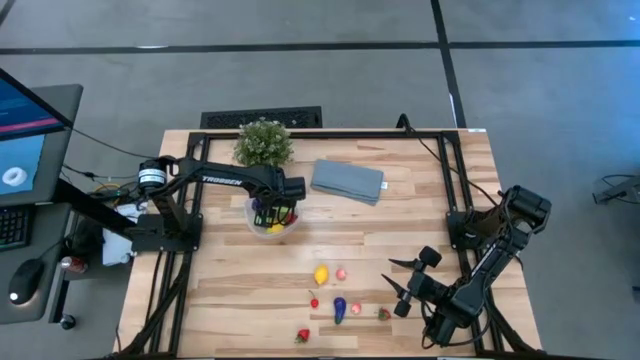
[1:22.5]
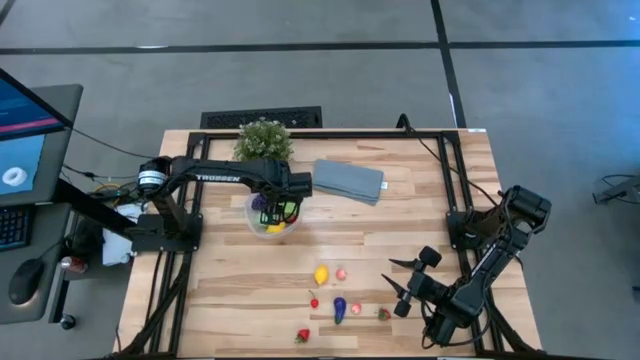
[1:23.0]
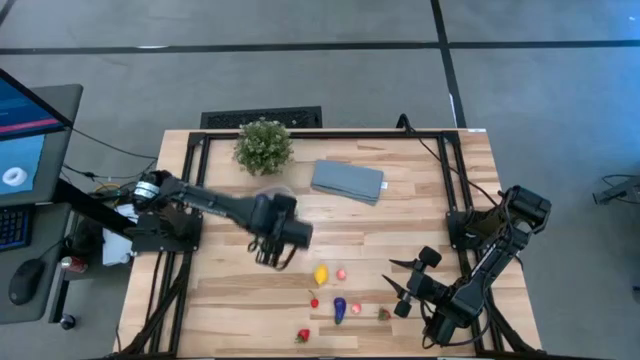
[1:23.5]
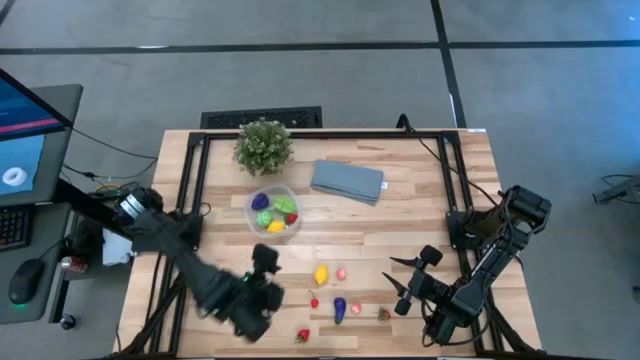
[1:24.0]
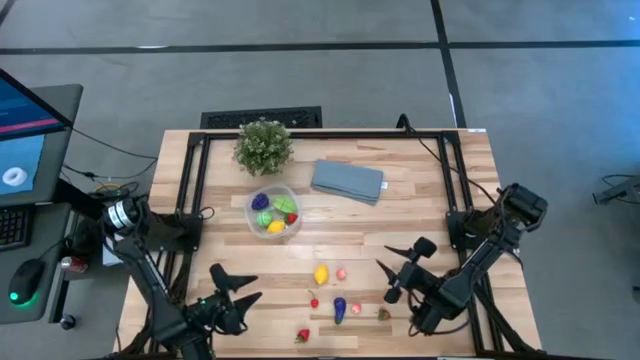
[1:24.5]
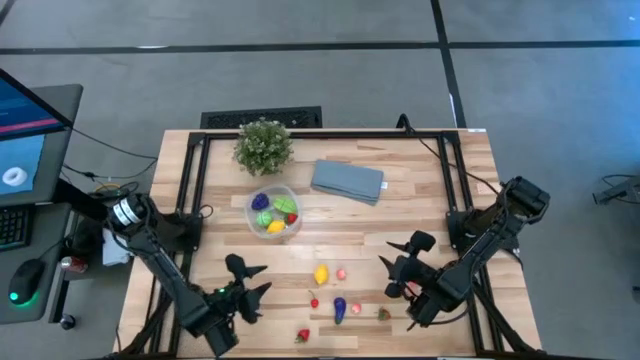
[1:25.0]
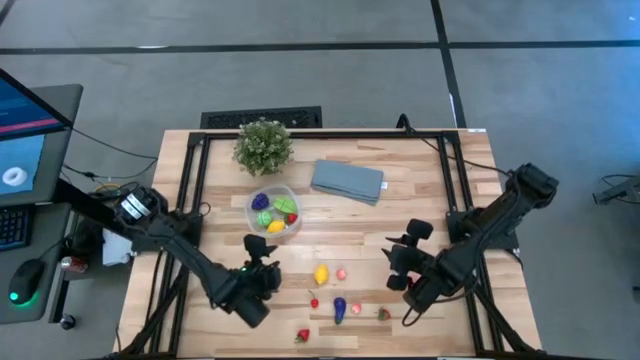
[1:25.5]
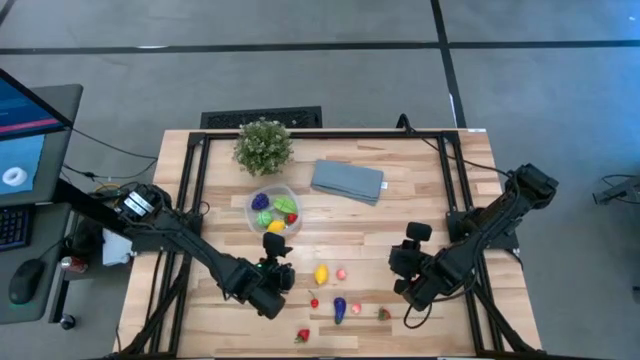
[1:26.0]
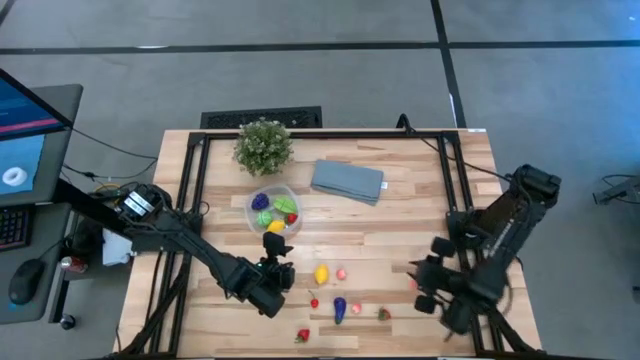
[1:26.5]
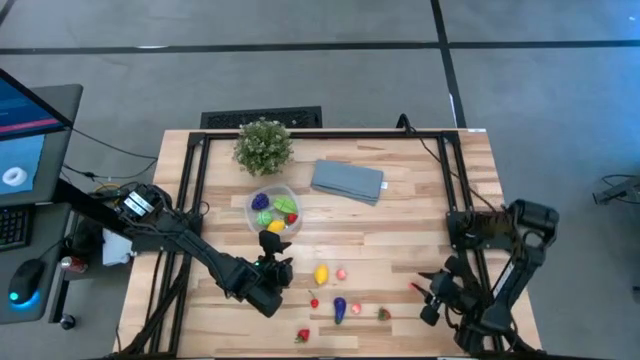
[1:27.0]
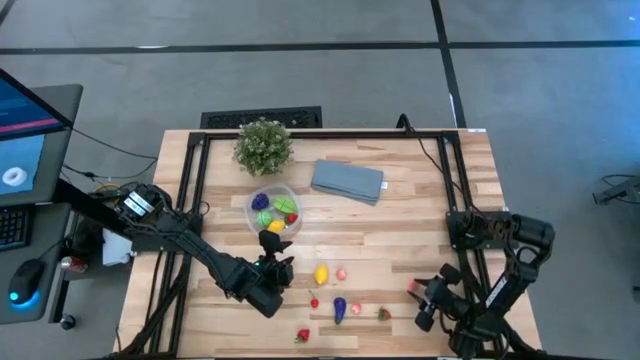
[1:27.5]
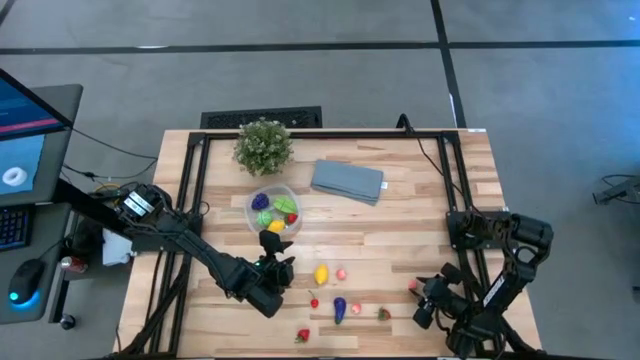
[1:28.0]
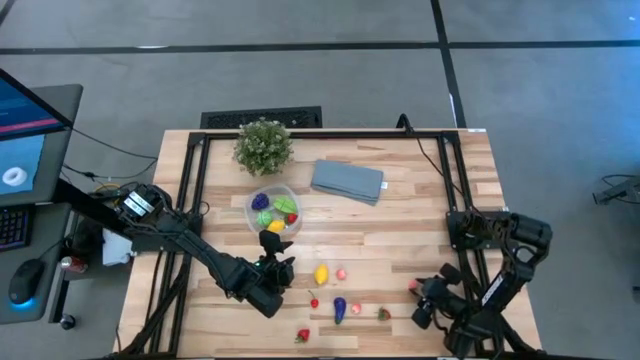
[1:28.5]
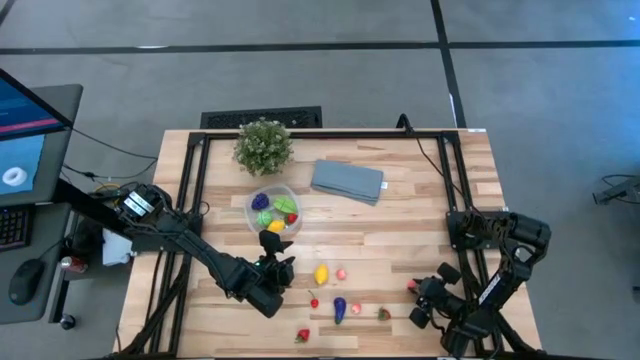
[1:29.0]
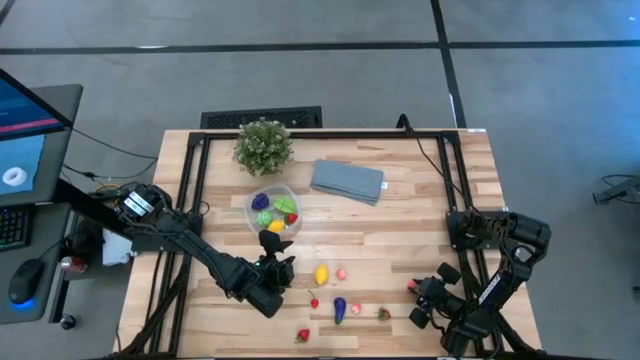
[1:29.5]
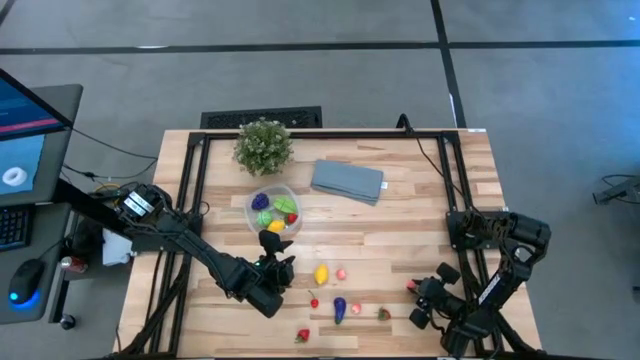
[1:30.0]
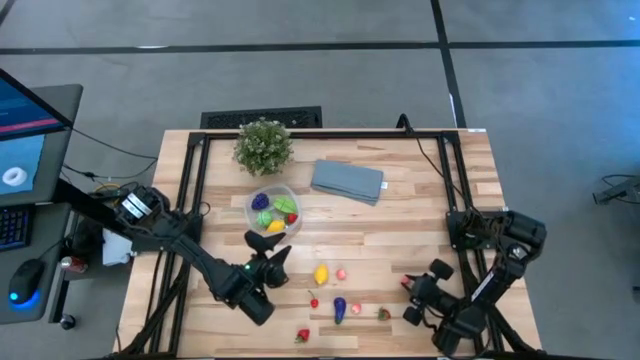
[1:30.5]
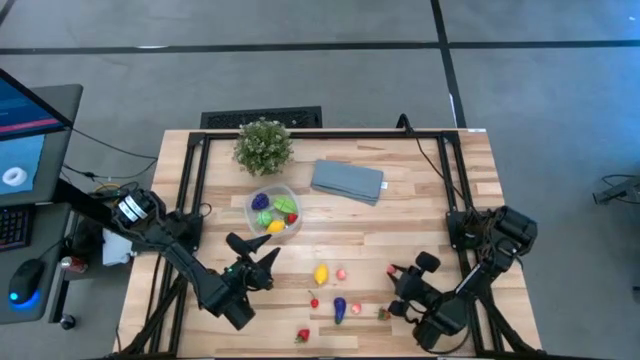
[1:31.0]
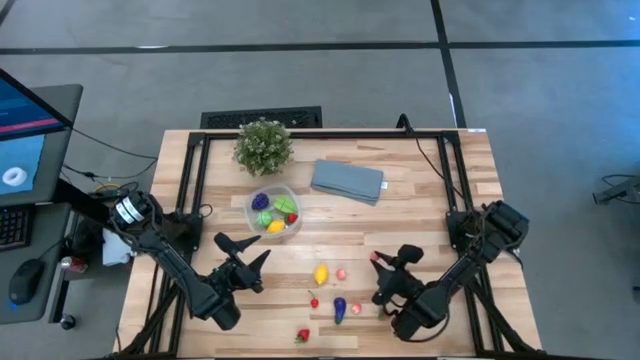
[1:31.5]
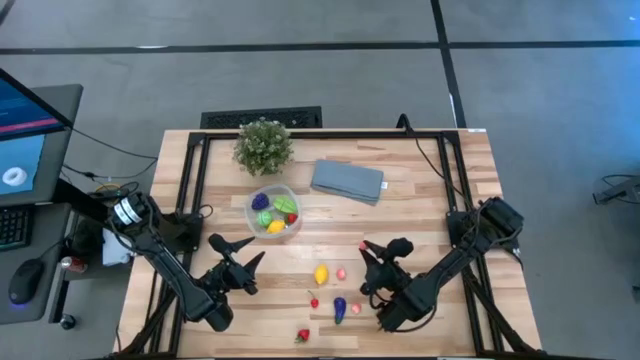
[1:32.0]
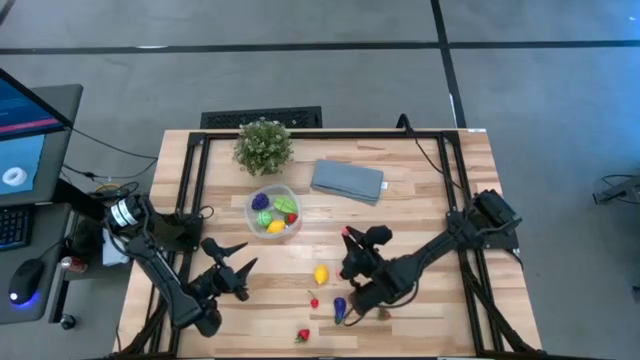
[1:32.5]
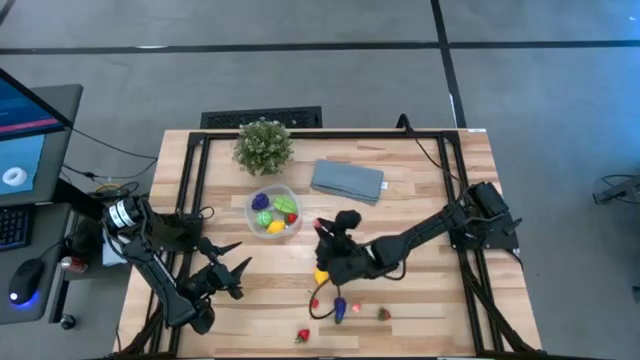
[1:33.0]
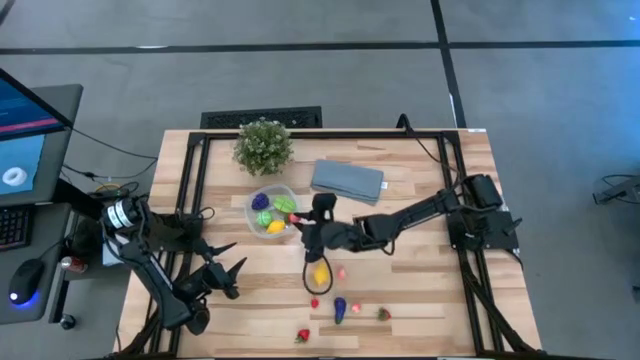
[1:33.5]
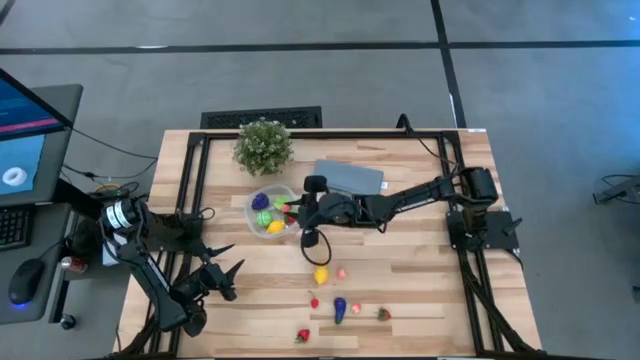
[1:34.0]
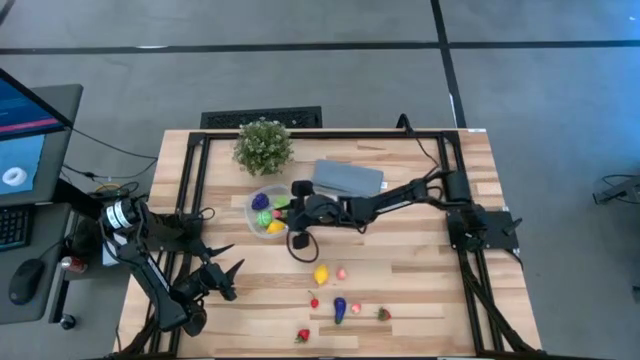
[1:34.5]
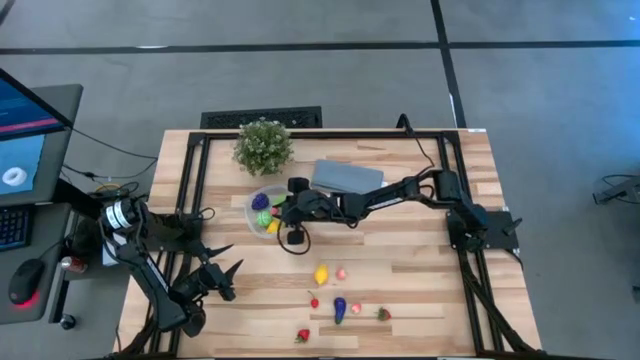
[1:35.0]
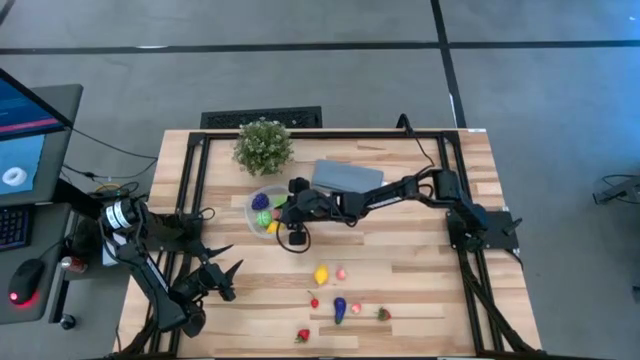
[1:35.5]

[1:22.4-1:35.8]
Task: Pick and placing Produce into tupperware
Put the right peach into the transparent bin

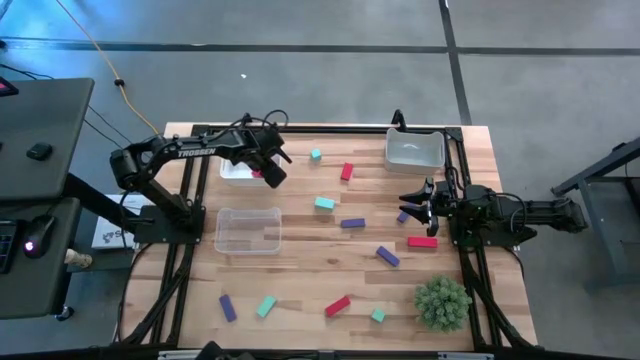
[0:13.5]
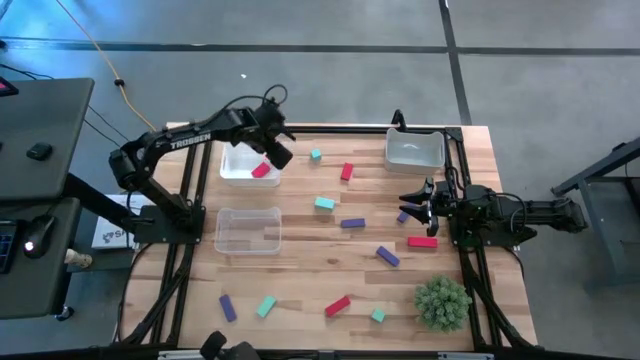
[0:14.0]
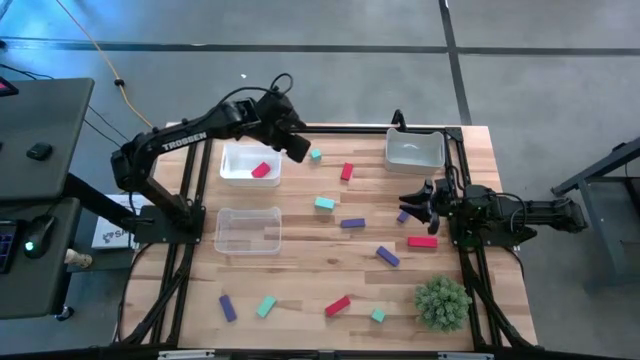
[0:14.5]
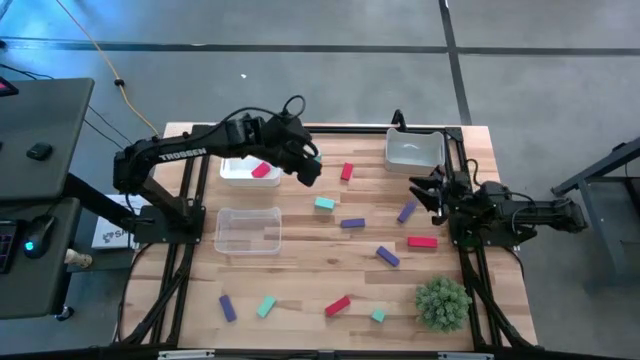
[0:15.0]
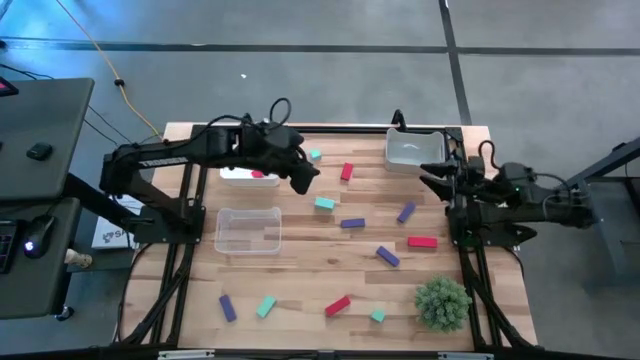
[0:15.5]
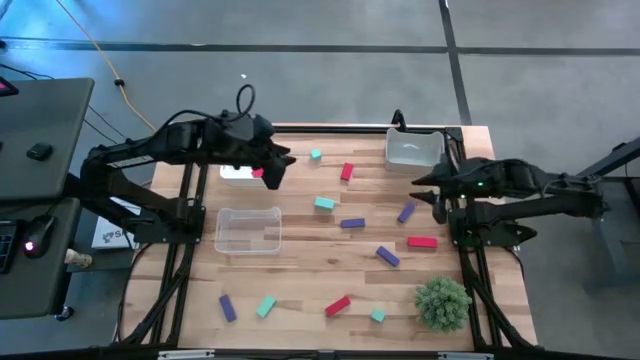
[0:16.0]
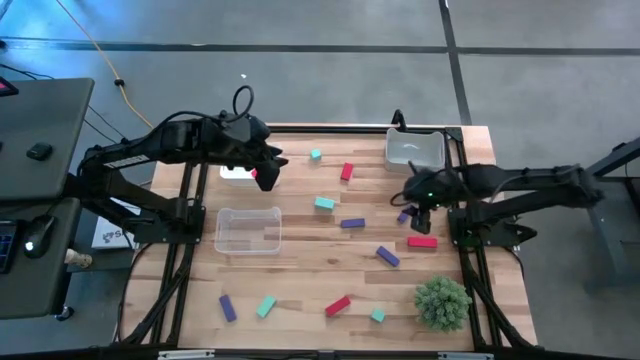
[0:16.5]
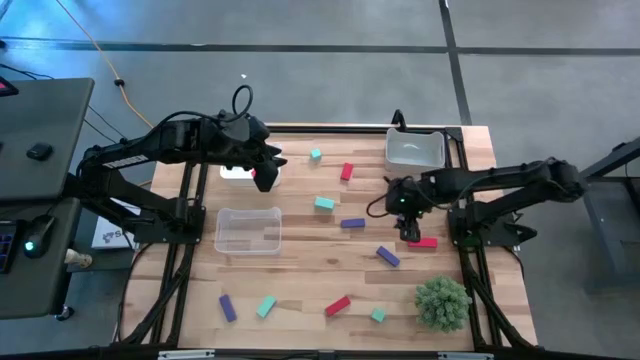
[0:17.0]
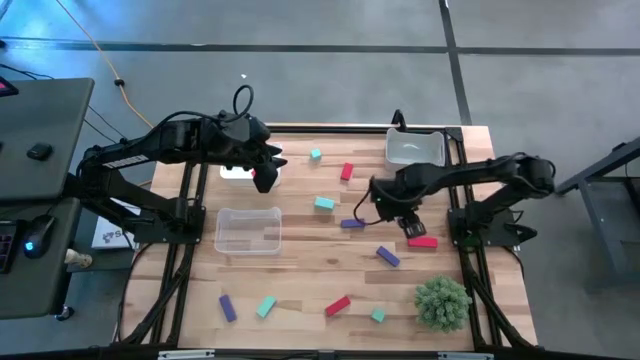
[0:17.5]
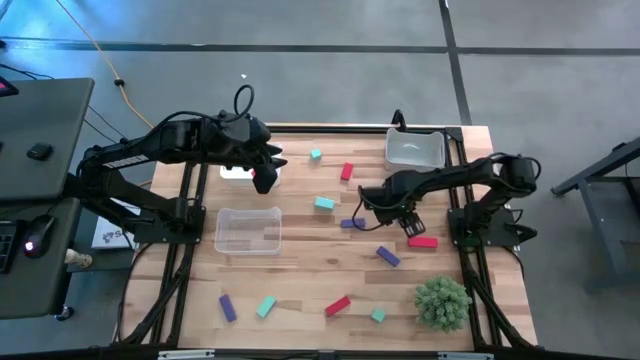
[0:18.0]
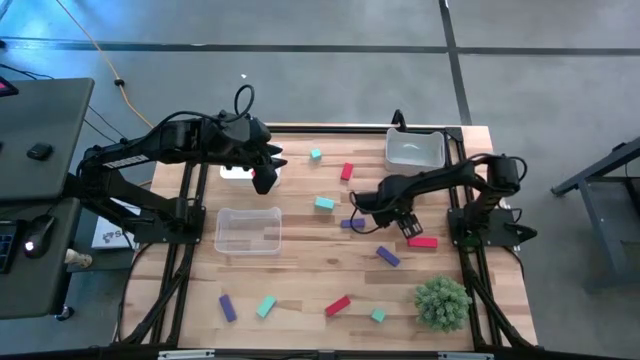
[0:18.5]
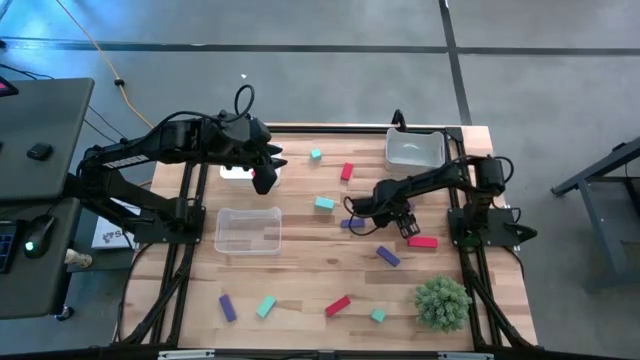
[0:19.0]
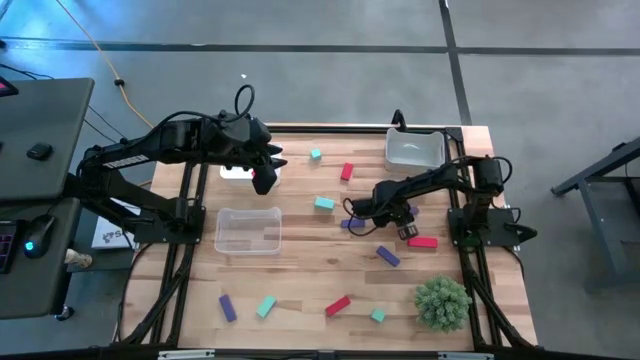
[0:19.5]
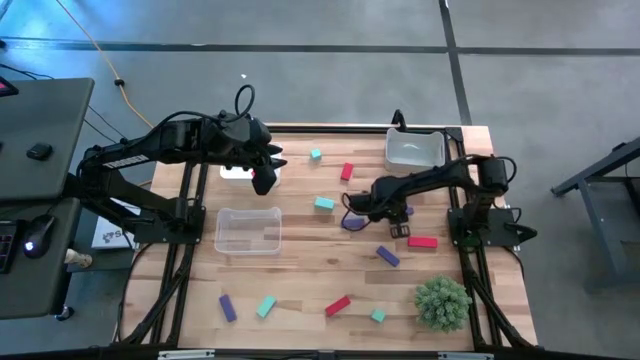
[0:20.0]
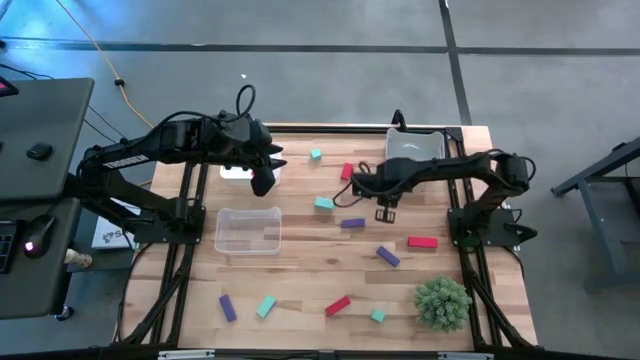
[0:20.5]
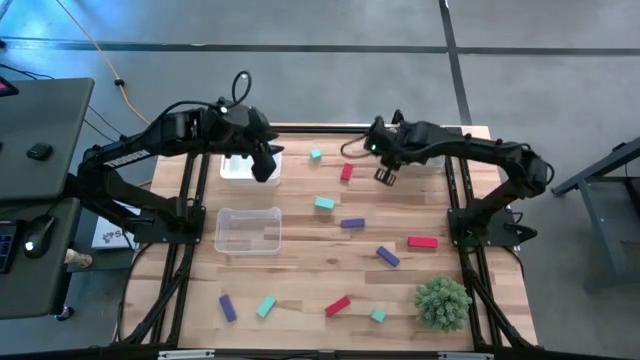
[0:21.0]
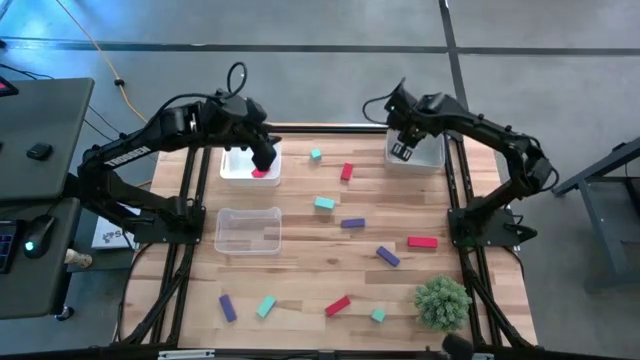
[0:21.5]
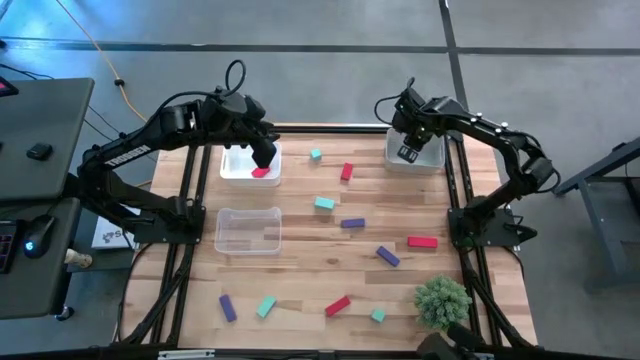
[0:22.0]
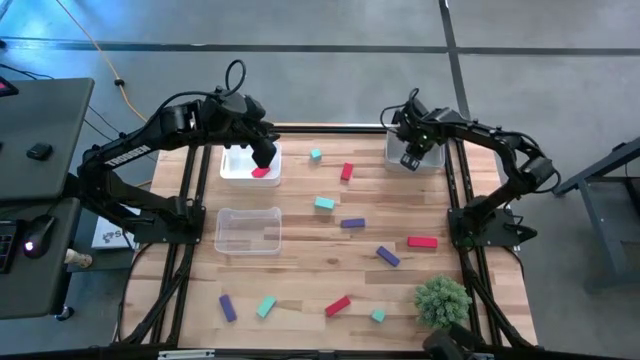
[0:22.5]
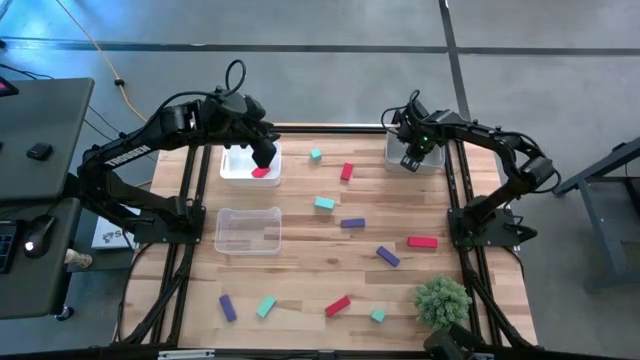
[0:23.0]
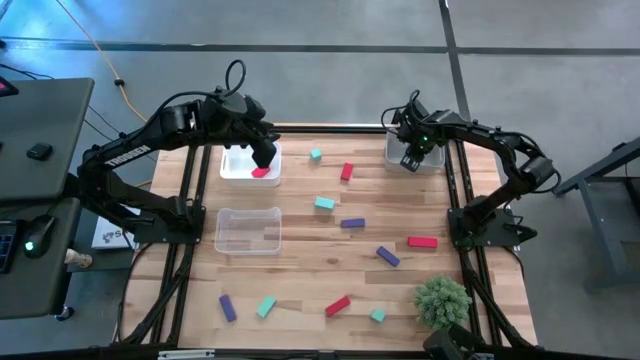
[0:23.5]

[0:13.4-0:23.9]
Task: Sort & place blocks by color
Put the violet block into the gray bin
